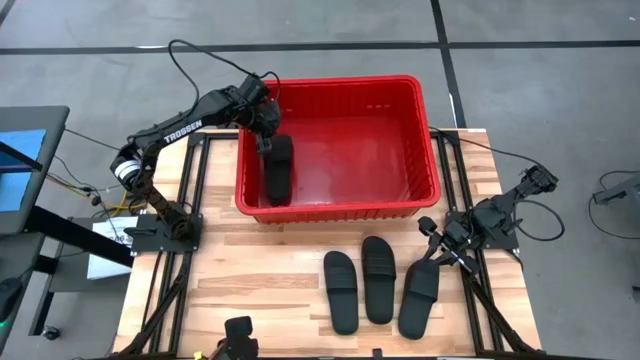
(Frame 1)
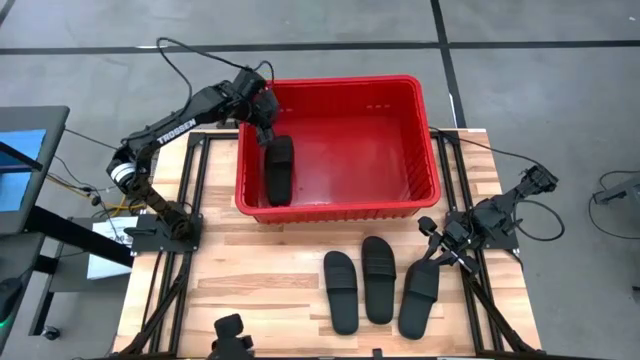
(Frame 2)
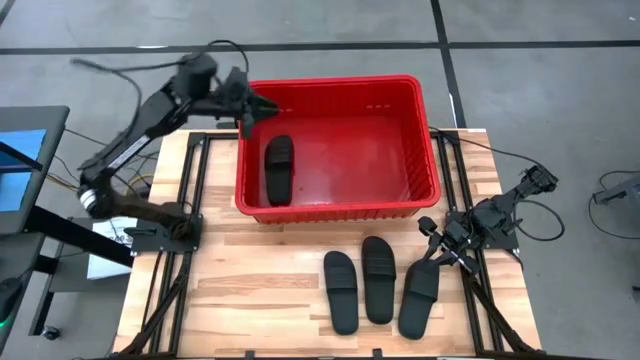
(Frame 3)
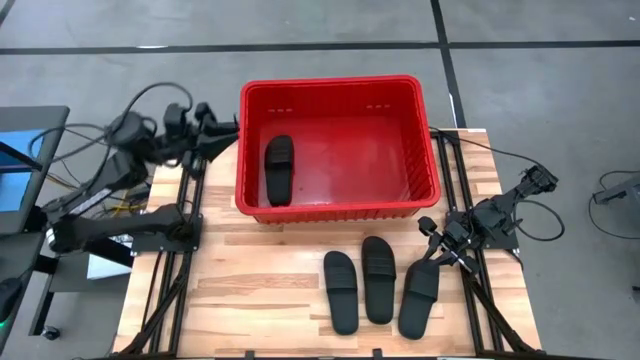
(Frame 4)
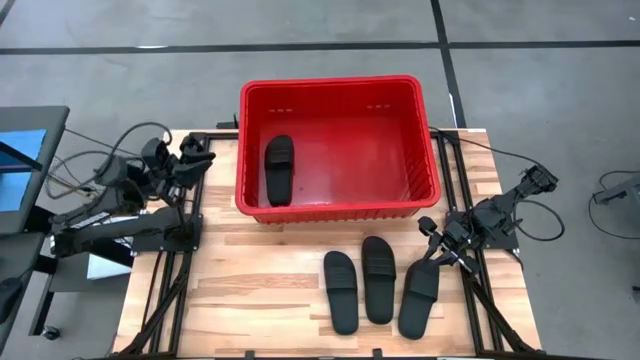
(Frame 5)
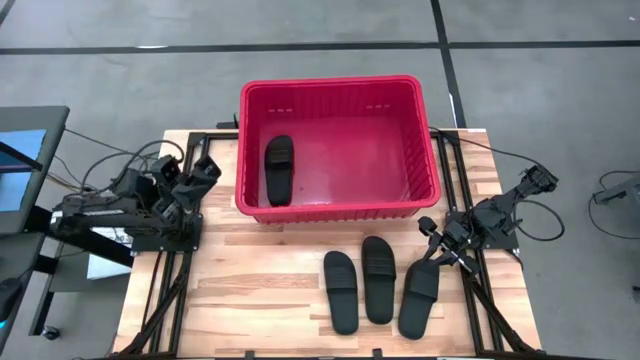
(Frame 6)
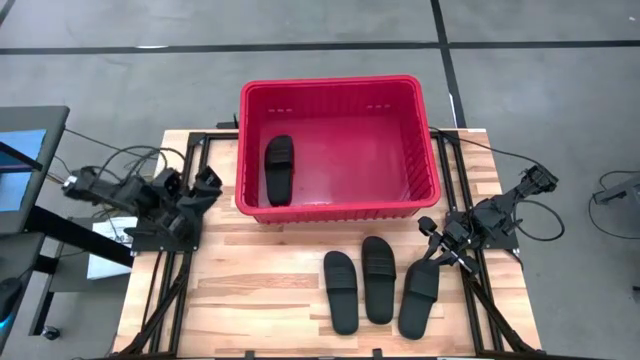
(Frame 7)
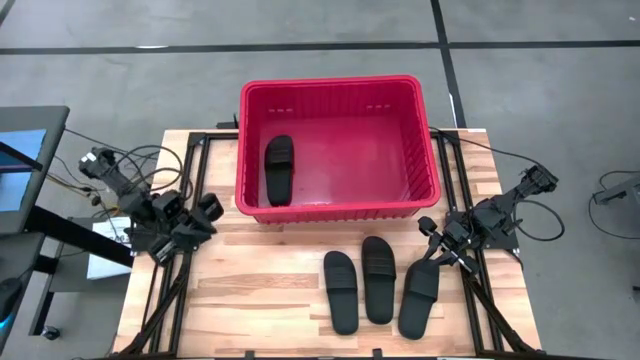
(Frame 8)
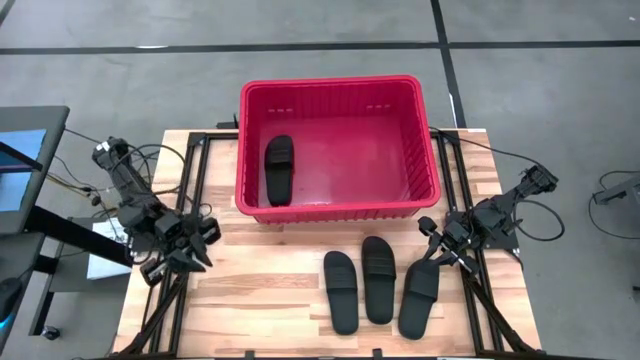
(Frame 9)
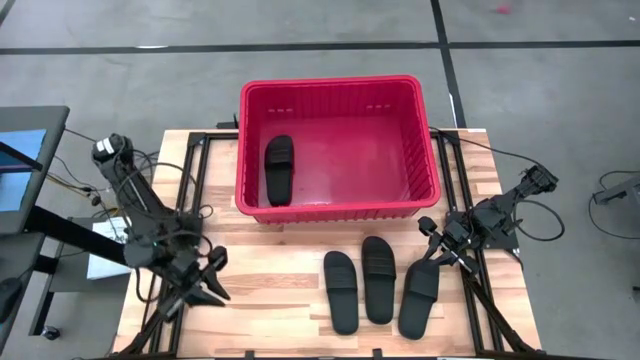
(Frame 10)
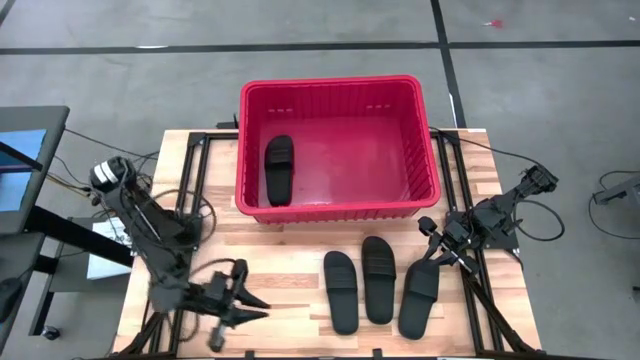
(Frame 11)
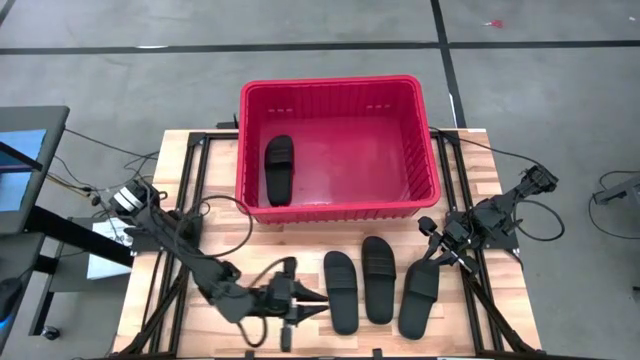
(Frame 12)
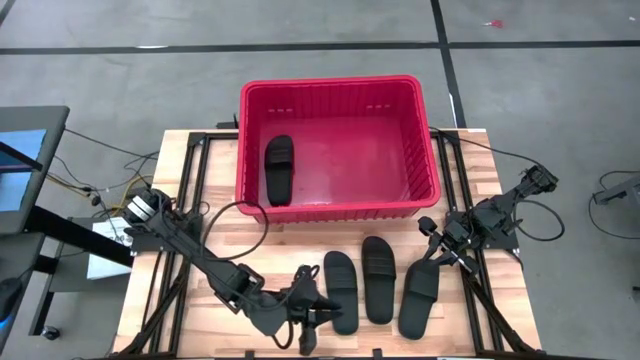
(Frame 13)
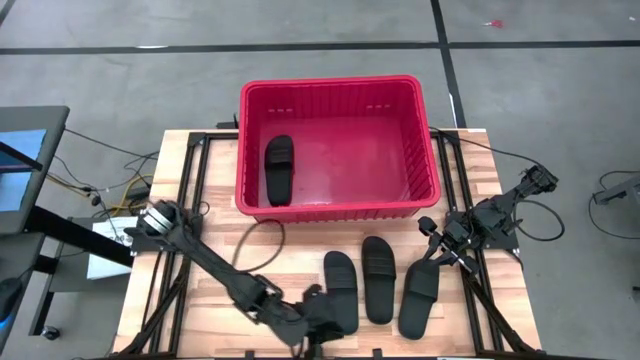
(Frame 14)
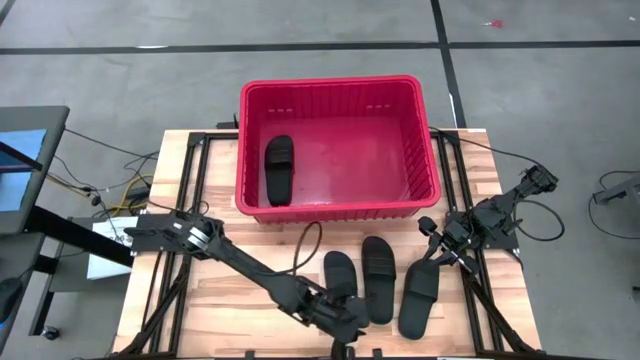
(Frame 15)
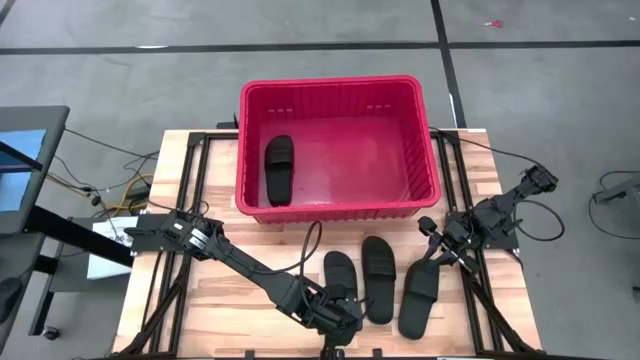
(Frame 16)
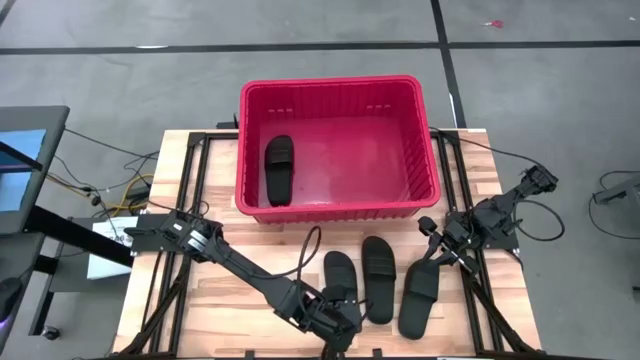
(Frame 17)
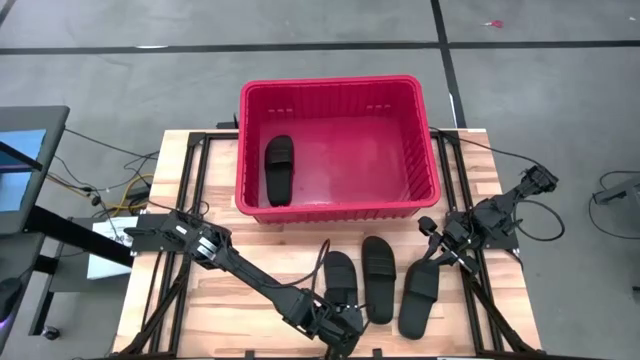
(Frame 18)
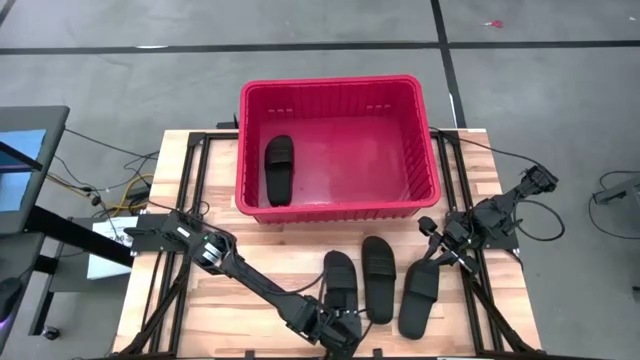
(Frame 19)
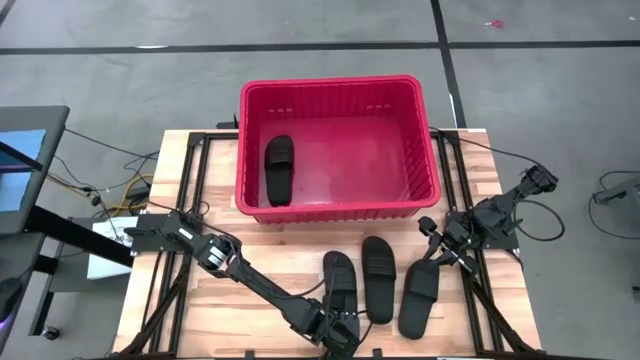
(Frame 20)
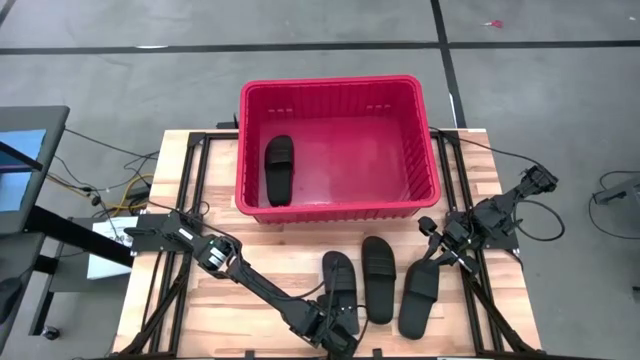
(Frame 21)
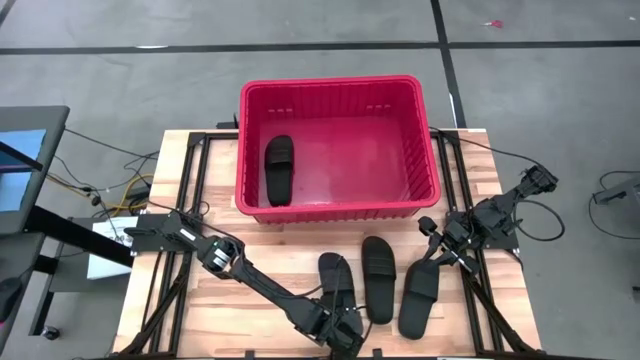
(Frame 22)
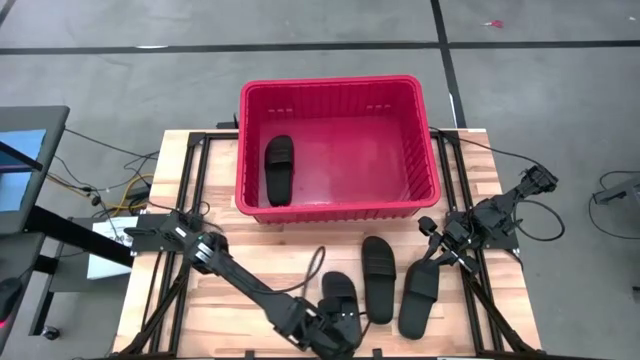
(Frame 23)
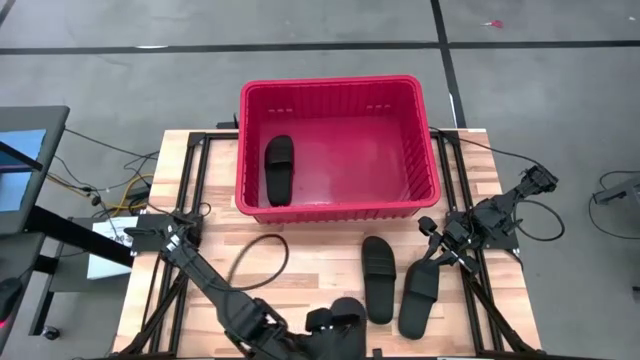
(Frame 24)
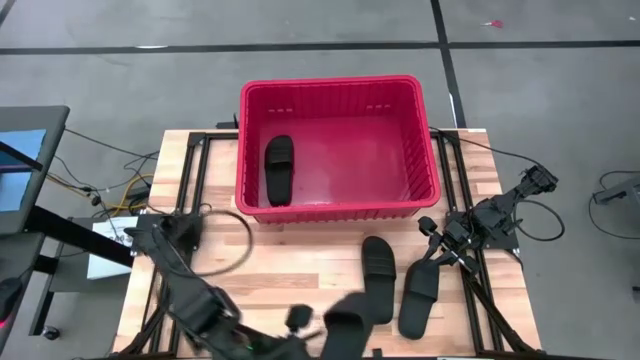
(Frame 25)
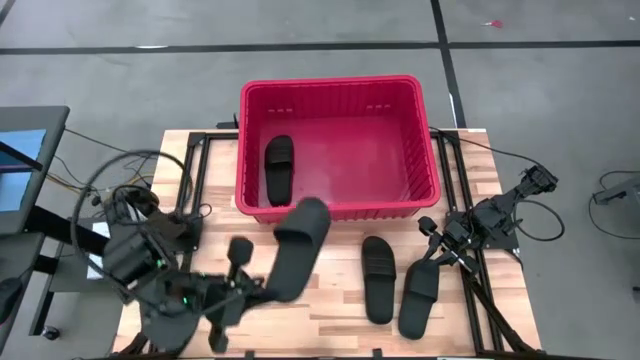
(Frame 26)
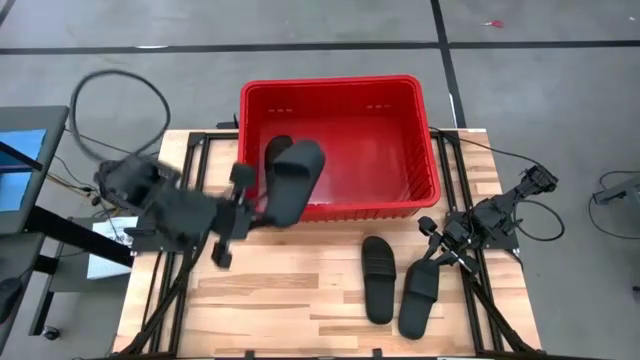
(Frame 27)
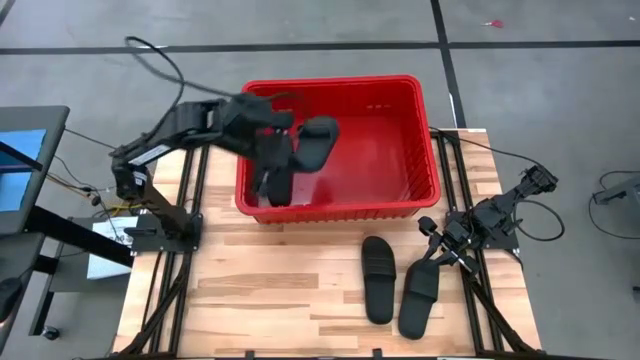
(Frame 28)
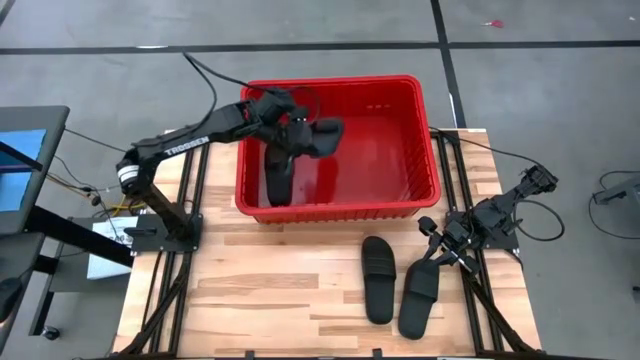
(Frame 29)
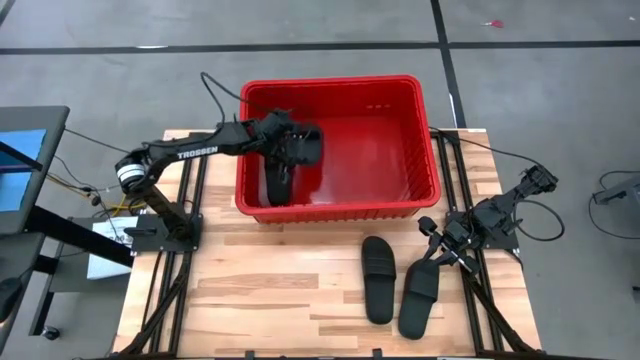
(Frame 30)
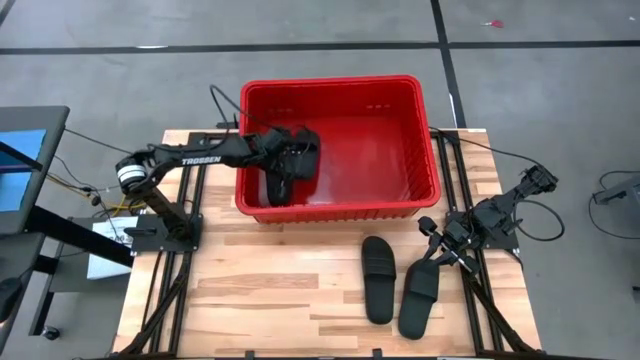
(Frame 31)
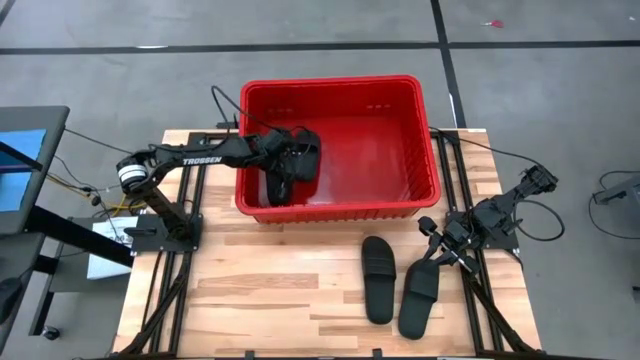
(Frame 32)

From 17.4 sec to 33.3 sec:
Task: Pick and place slides into bin
Put the black slide into the red container

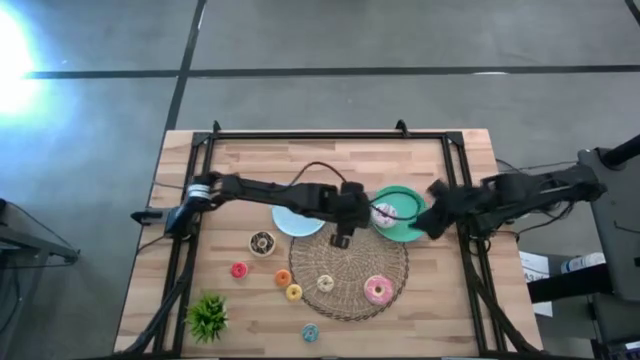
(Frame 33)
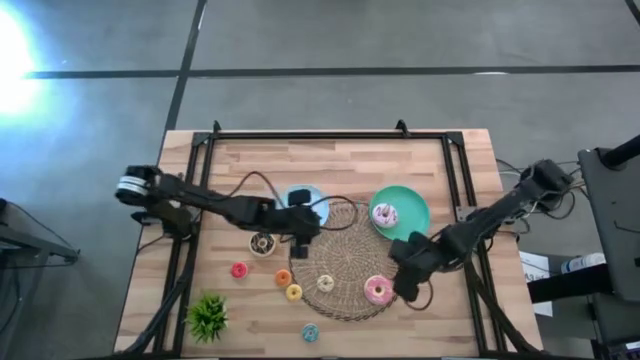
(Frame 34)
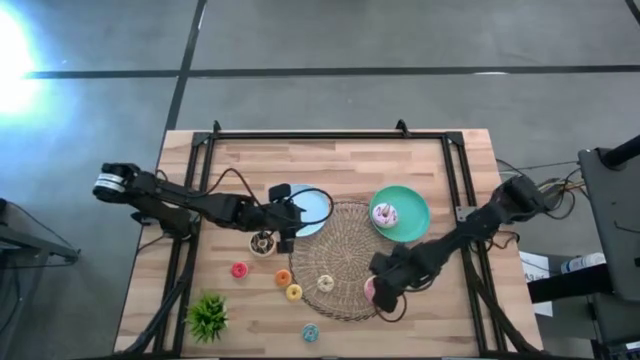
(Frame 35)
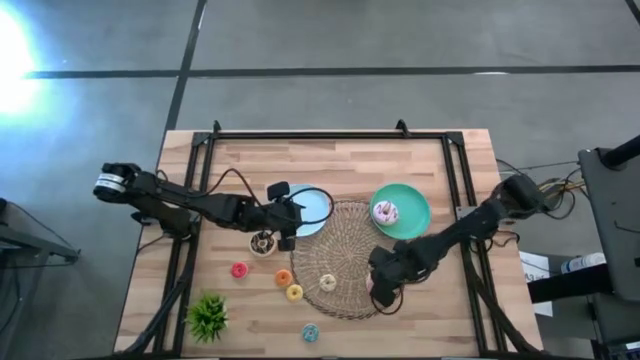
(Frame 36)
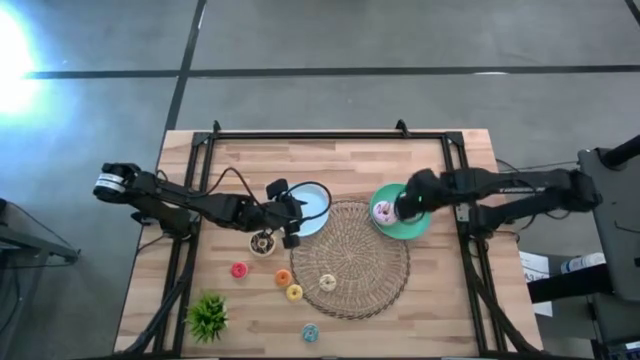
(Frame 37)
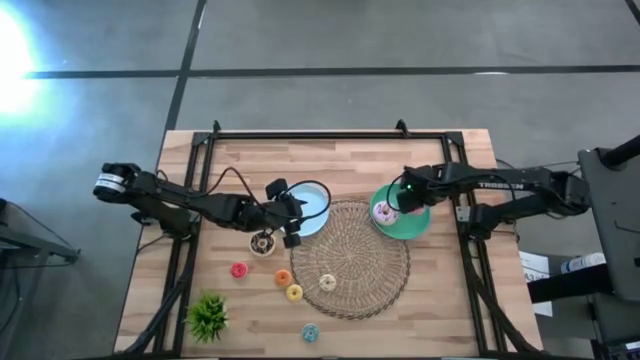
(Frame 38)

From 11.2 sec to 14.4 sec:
Task: Pick & Place donuts
Put the big pink donut on the green plate
